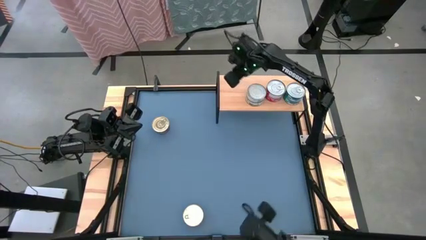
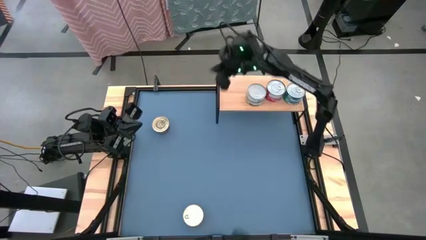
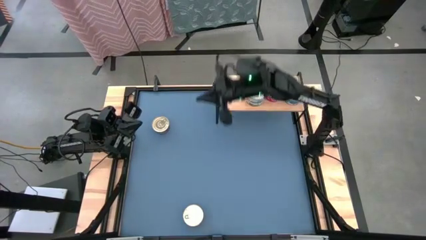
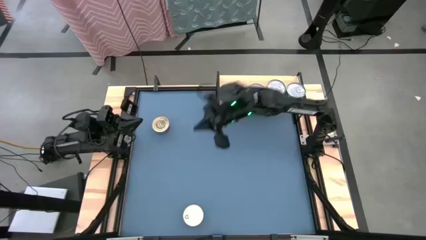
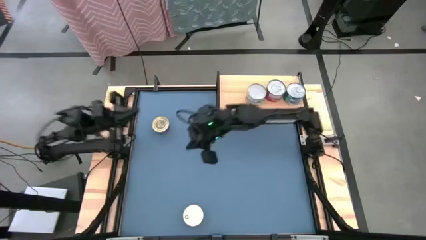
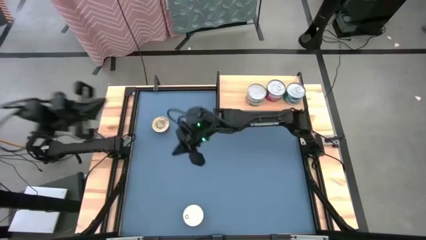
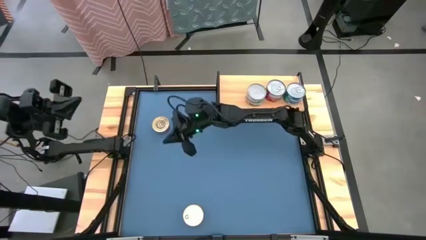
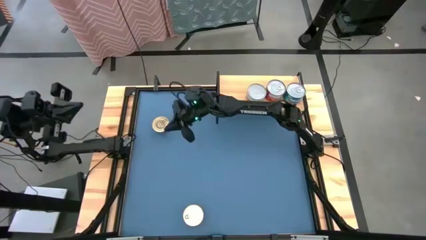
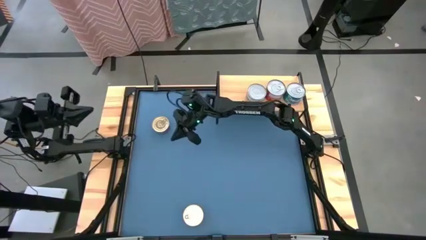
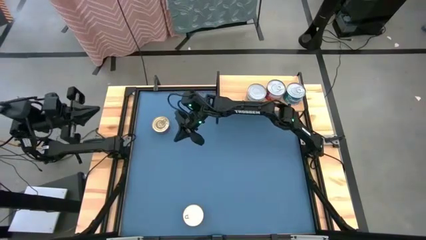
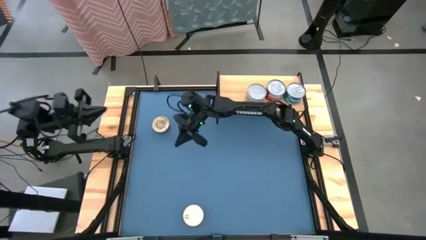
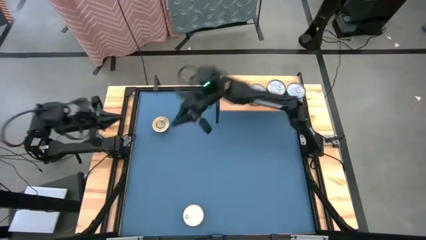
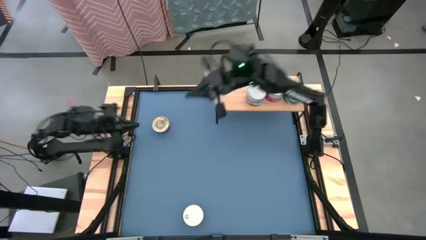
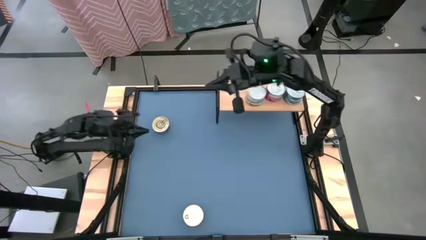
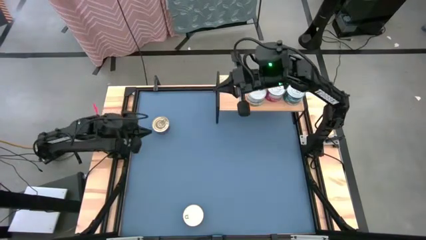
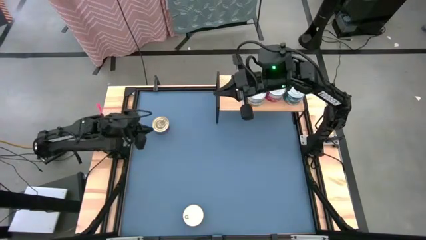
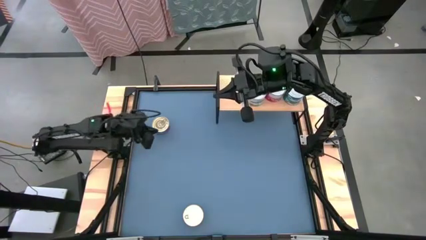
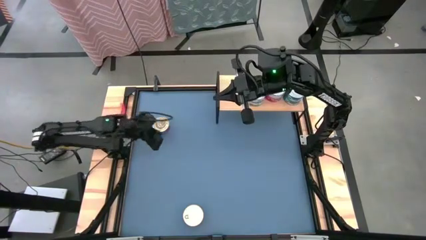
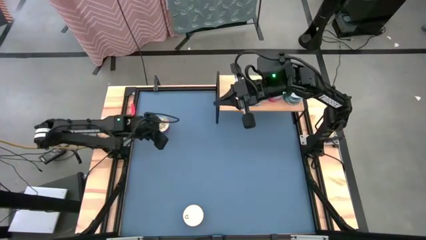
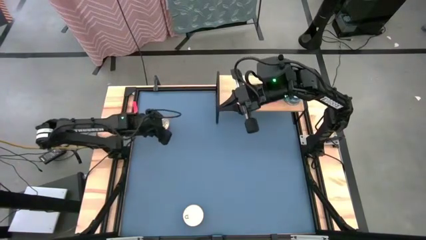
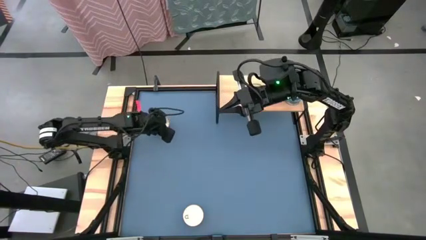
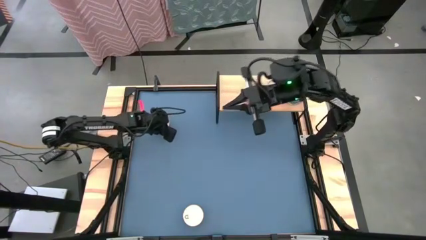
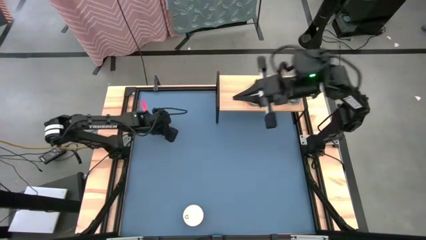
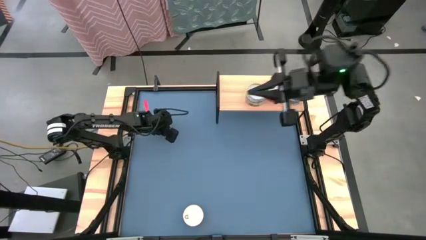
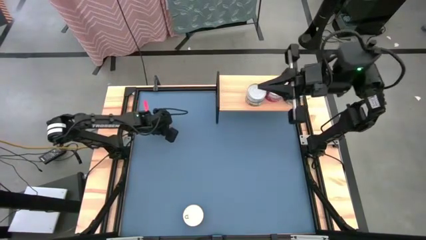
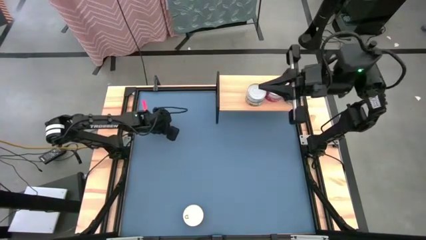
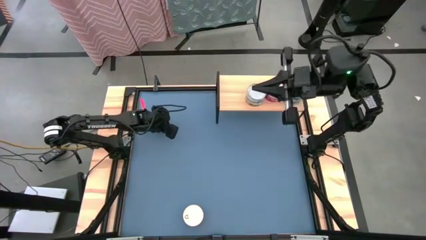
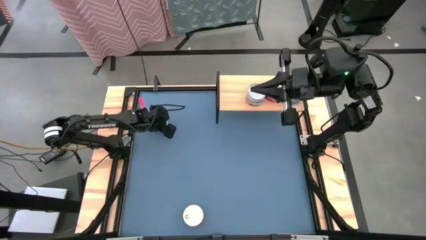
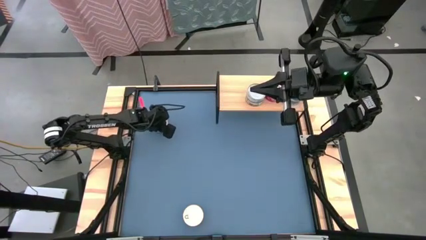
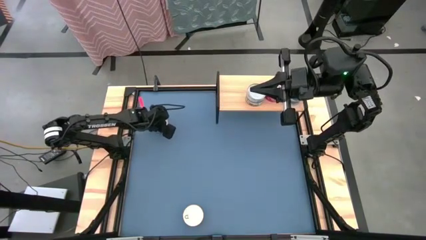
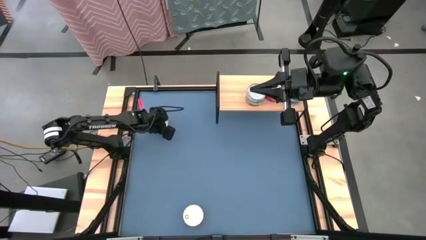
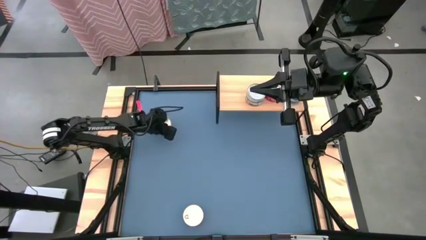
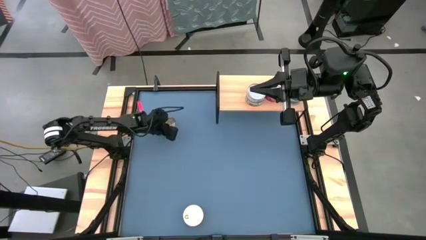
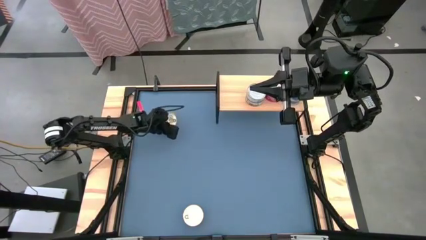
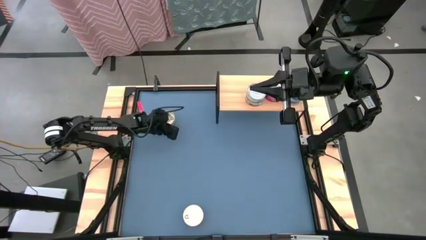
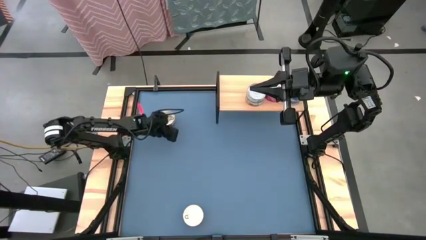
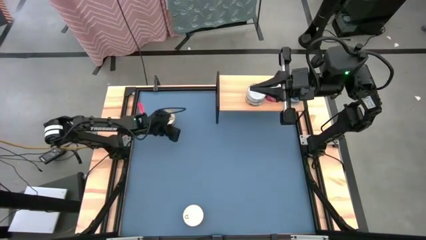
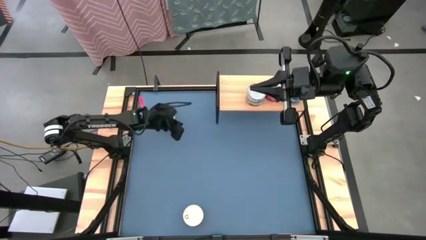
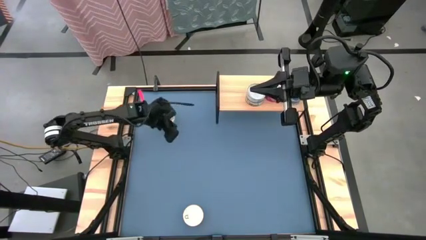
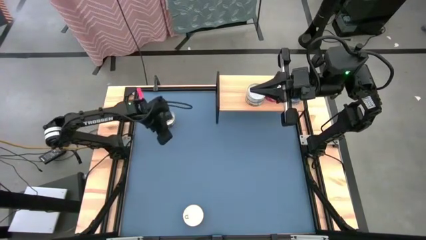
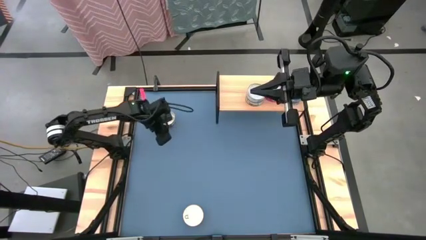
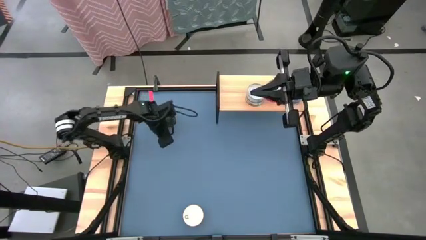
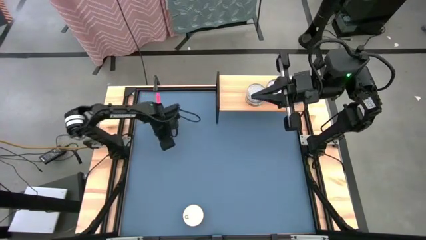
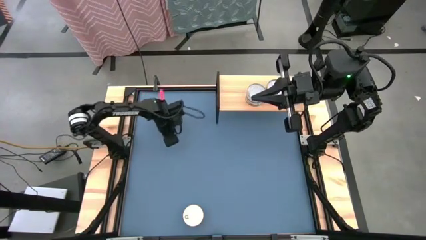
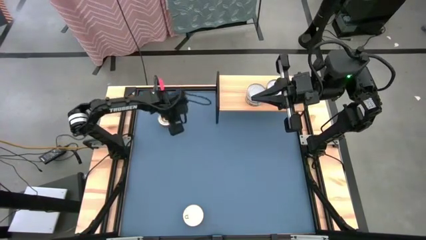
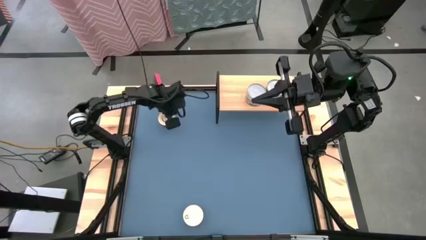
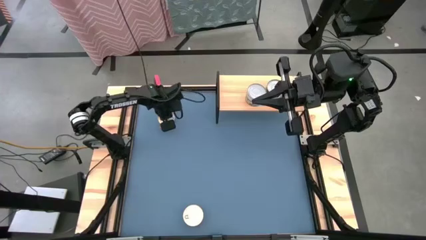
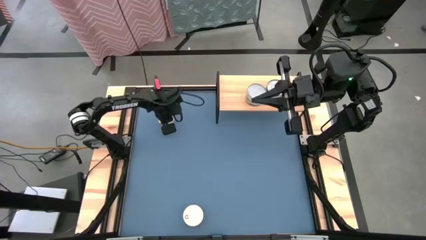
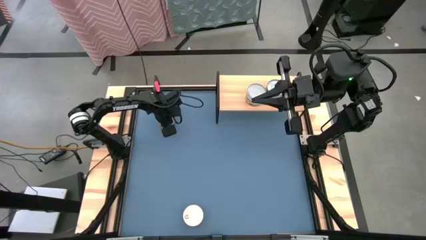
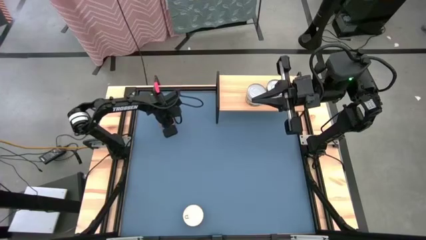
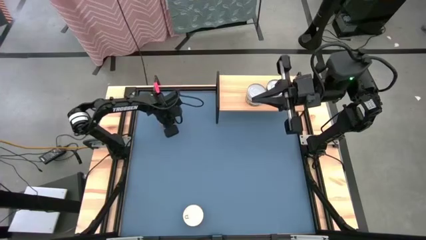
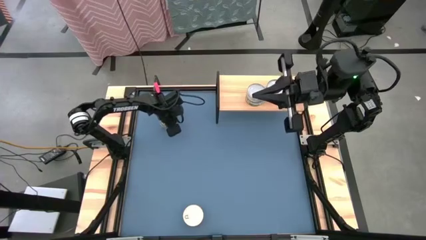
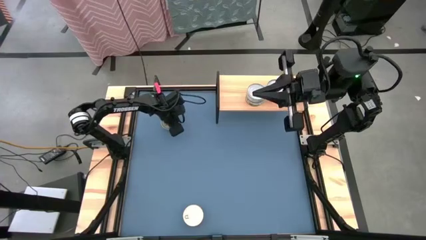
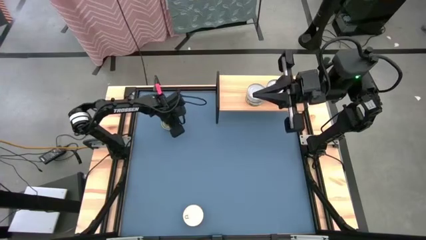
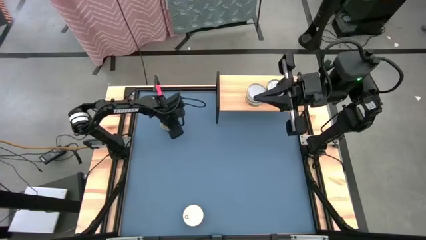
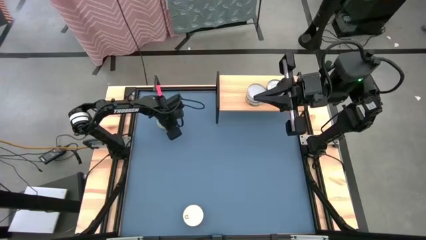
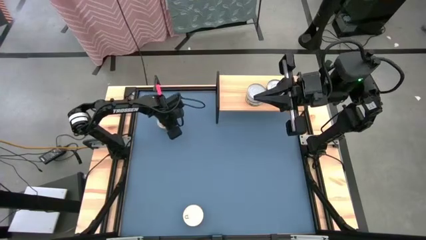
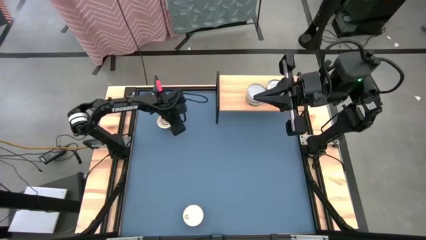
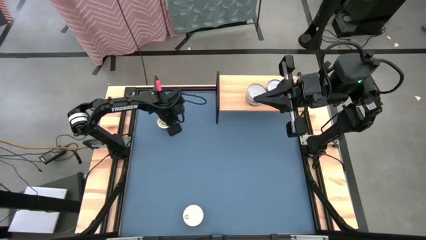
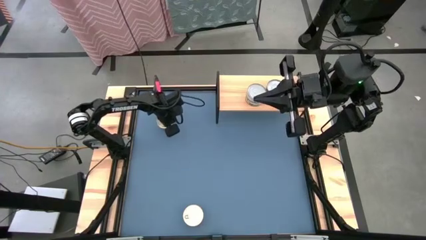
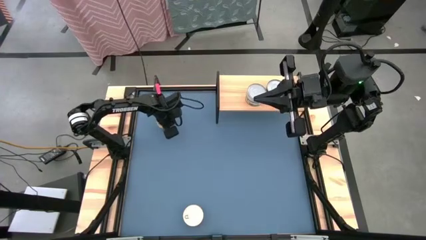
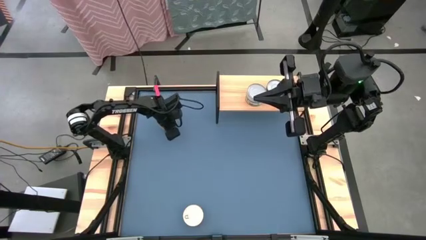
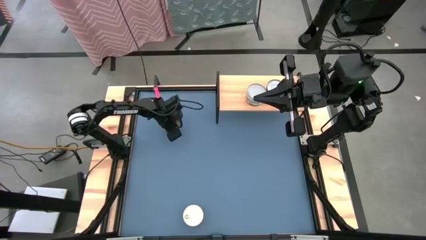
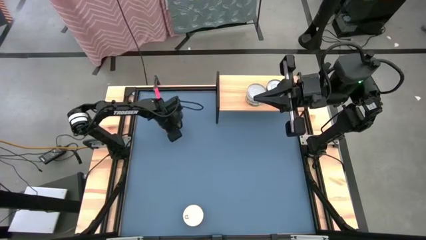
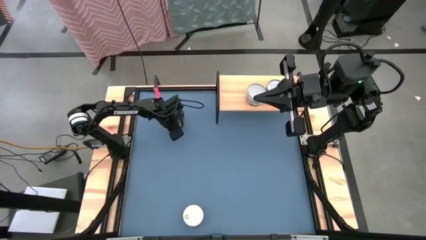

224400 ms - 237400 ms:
Task: Stack canned seafood by type on shelf
Put the top blue-pink tuna can on the shelf

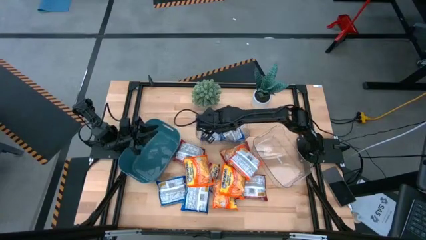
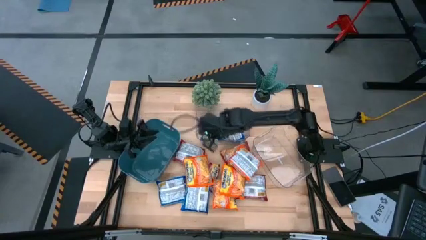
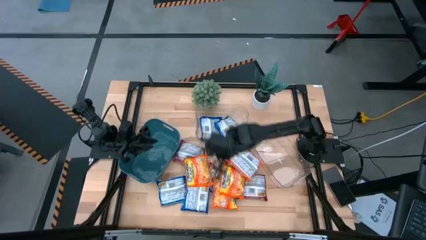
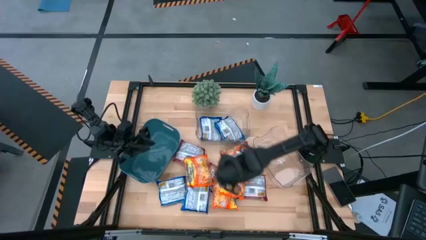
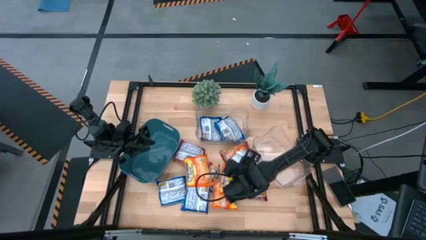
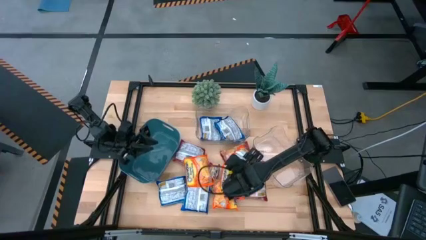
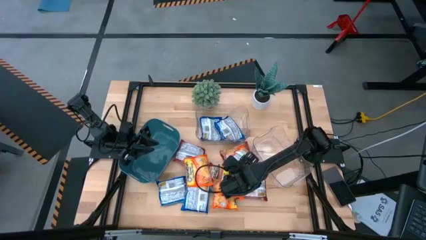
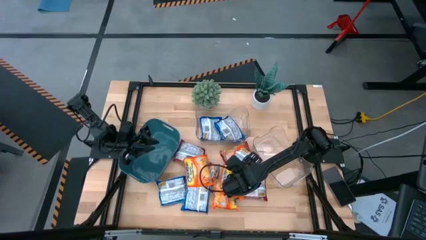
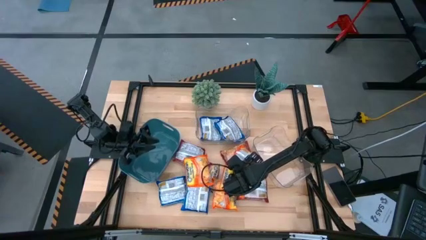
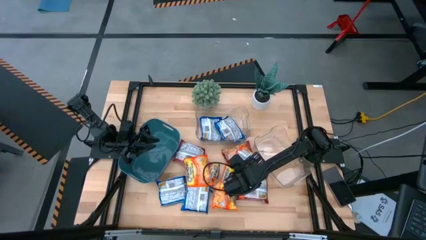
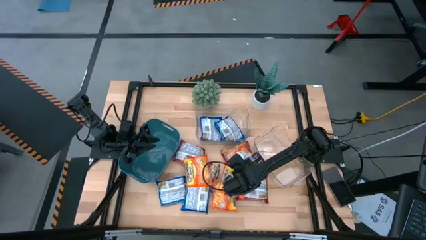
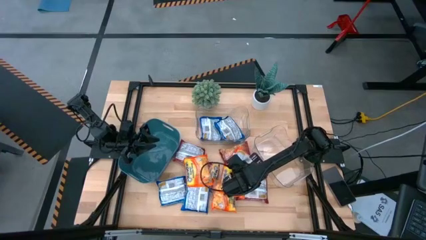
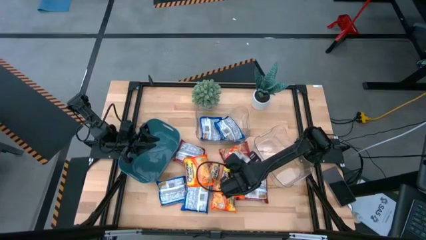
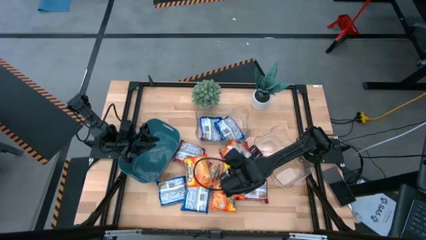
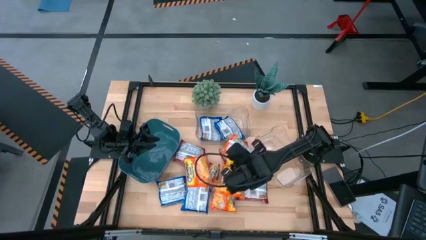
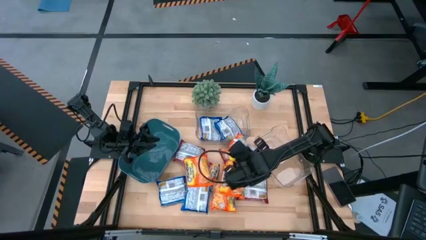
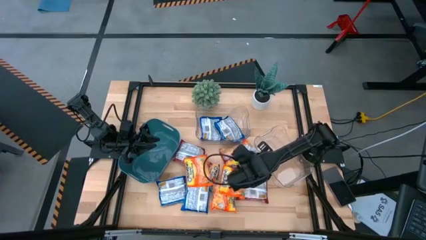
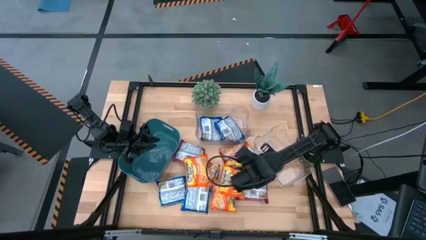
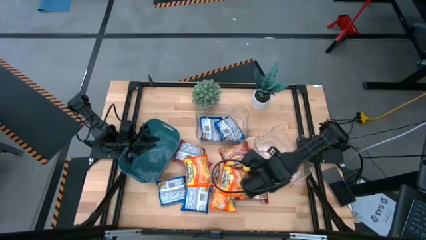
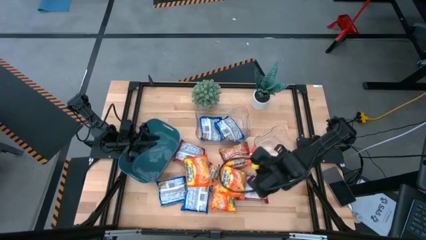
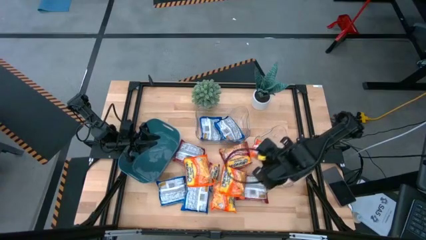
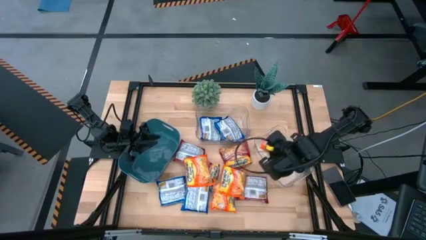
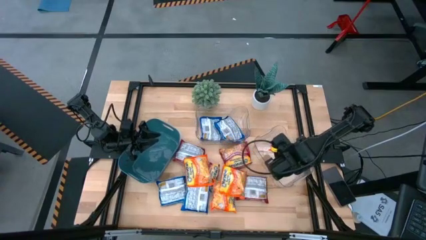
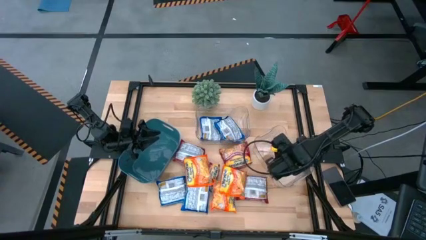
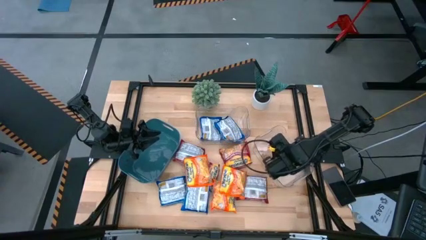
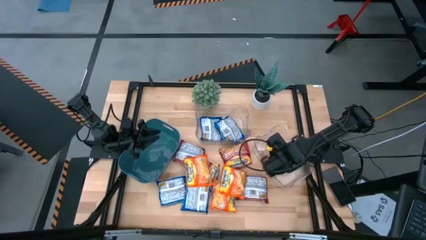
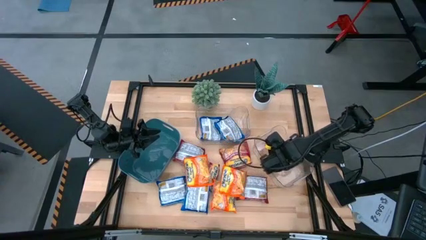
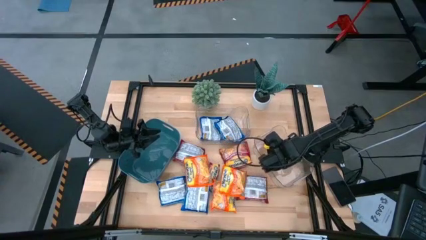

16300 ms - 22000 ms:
Task: Sort Maruchan noodles
Put the orange noodle pack into the right transparent bin
